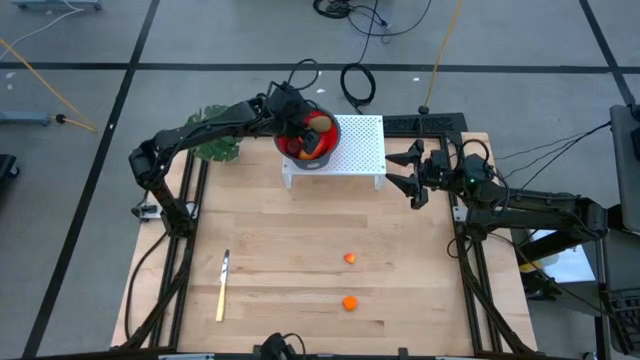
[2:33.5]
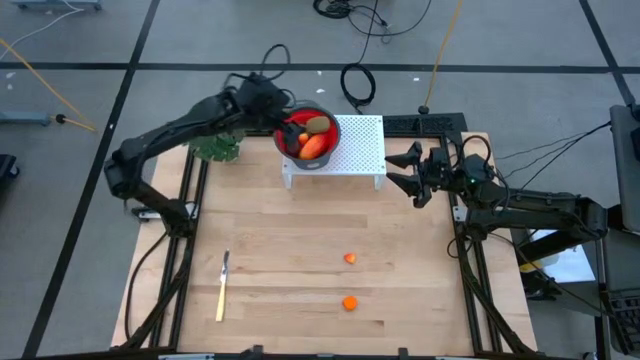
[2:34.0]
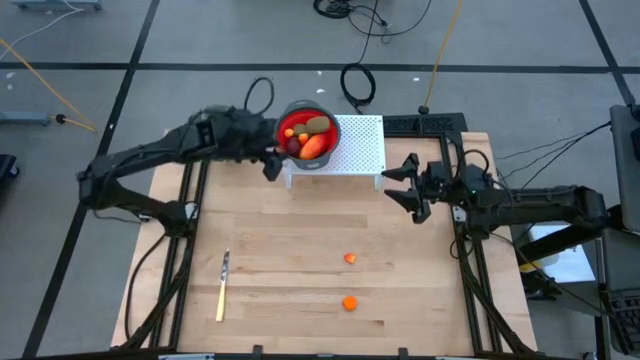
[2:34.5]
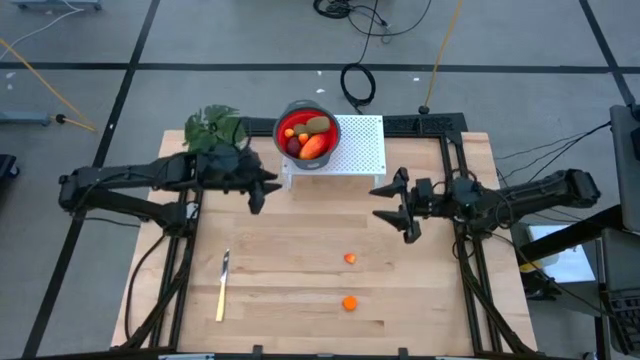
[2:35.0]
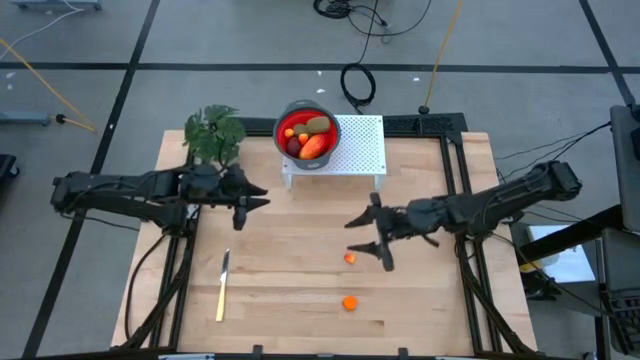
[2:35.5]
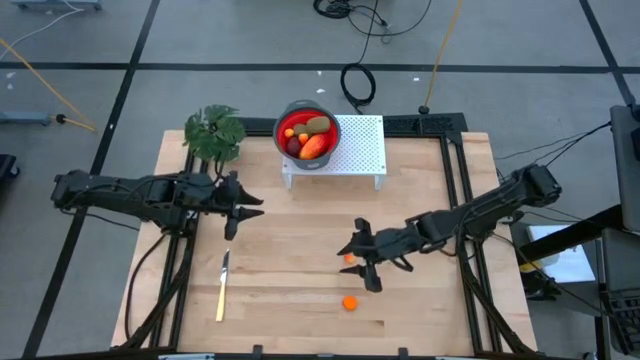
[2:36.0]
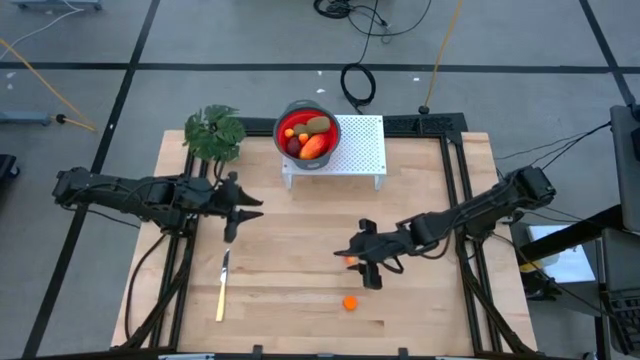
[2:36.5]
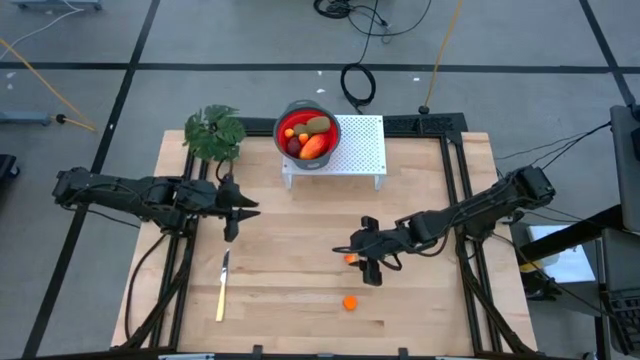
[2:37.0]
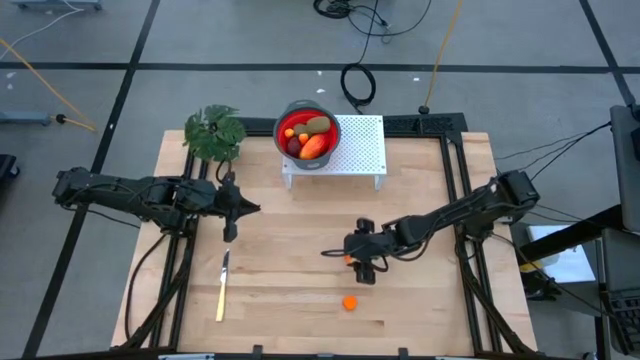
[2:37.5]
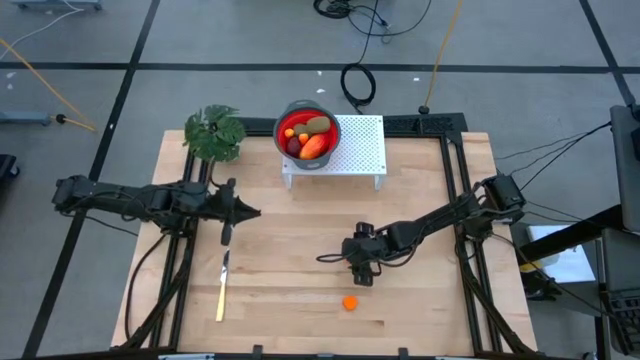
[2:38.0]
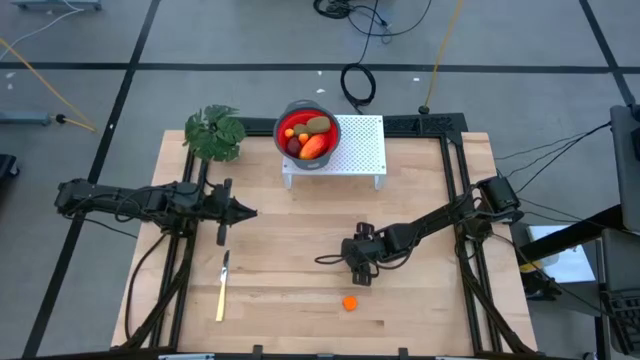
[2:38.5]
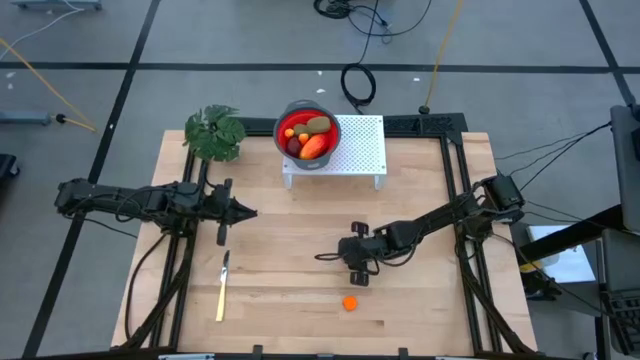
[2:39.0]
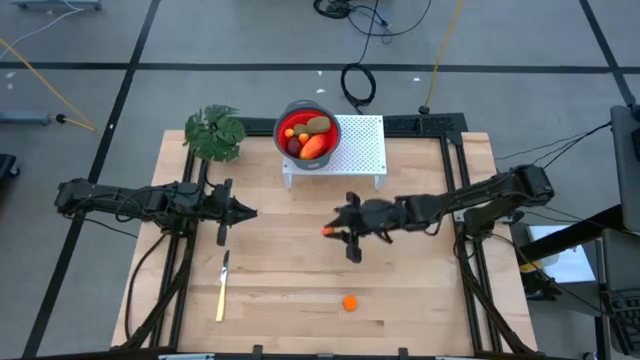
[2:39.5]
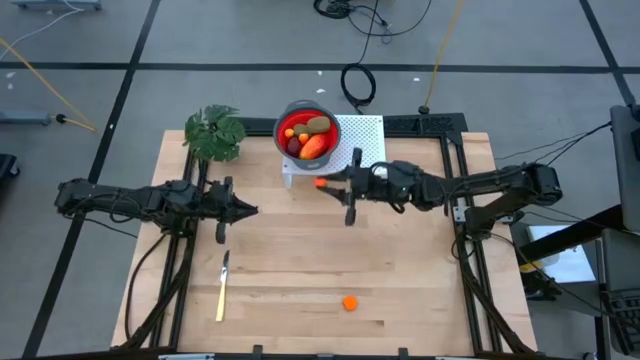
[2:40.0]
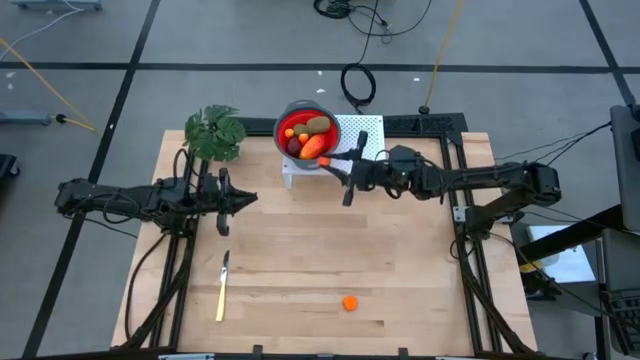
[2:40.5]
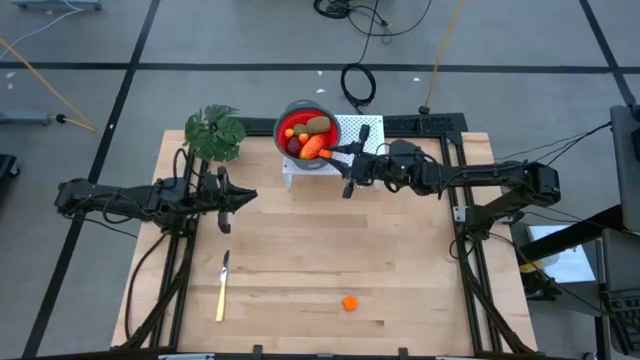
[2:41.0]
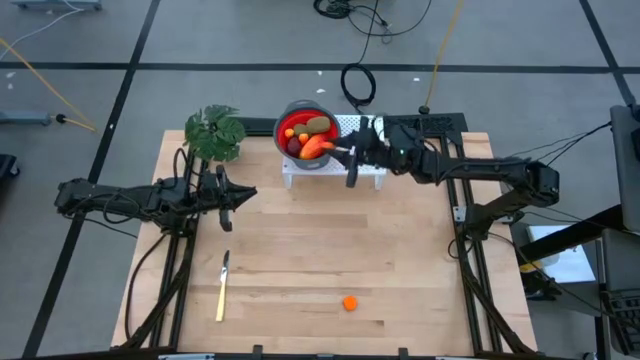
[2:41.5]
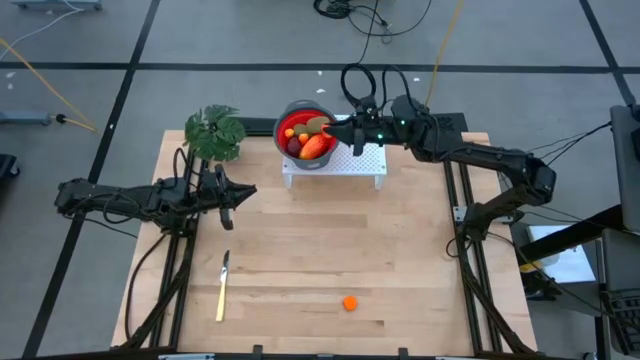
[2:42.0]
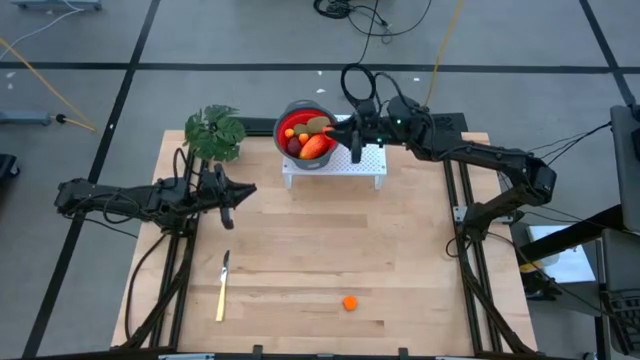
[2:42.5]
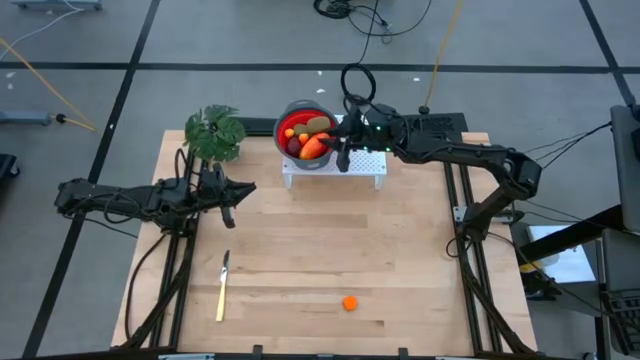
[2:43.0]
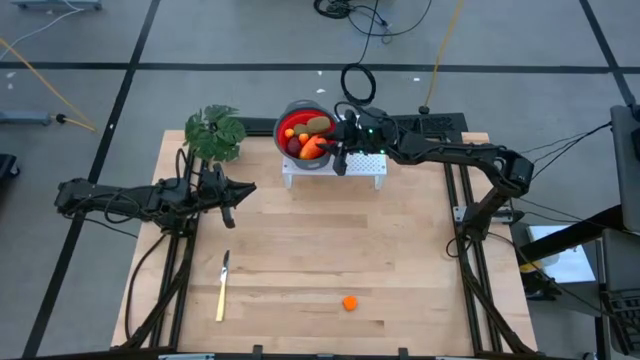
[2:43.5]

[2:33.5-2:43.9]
Task: Pick & Place Fruit
Put the pear into the red strainer bowl on the shelf

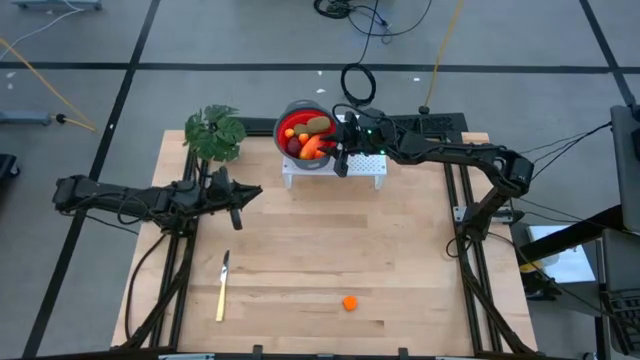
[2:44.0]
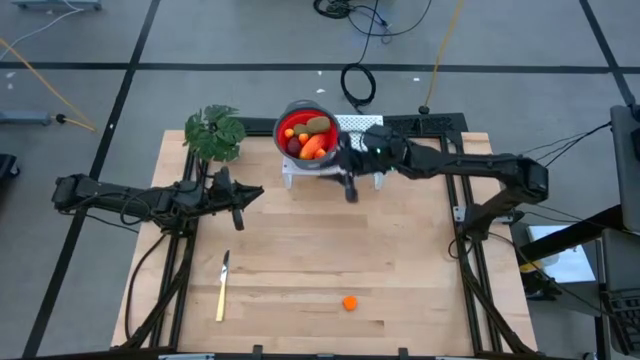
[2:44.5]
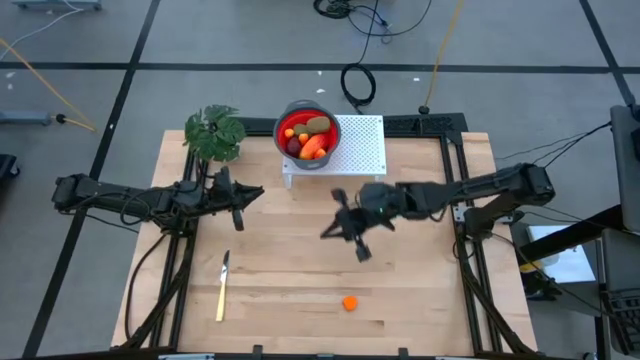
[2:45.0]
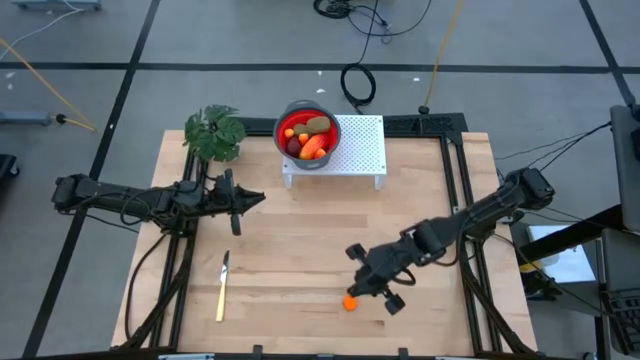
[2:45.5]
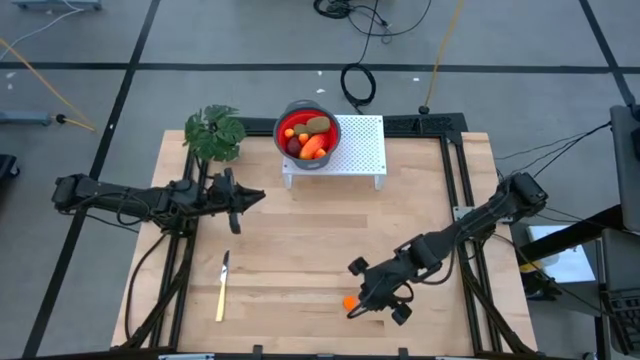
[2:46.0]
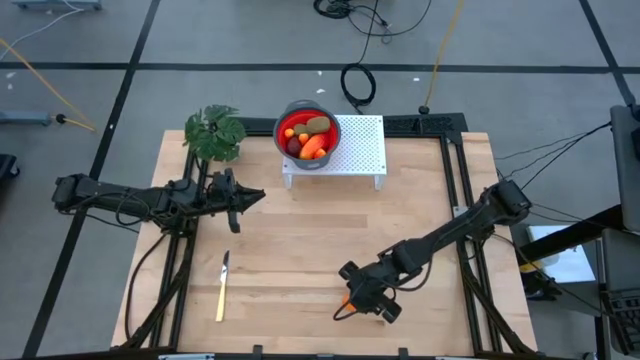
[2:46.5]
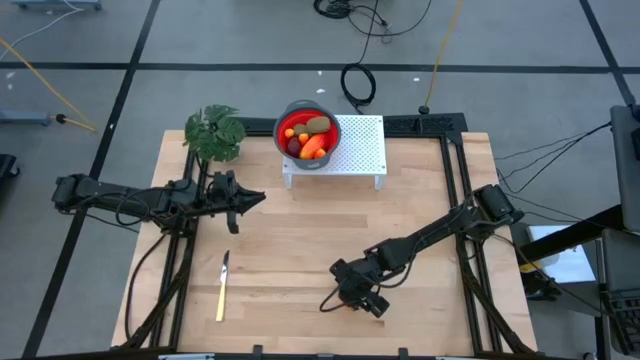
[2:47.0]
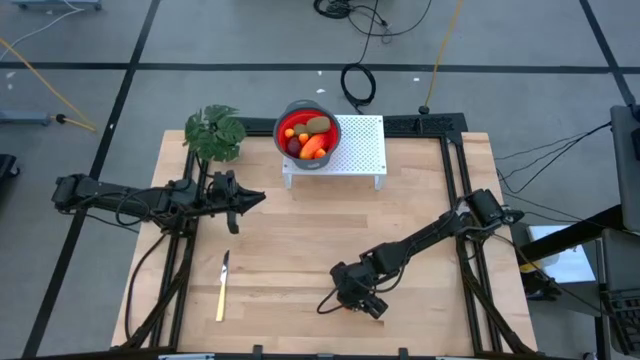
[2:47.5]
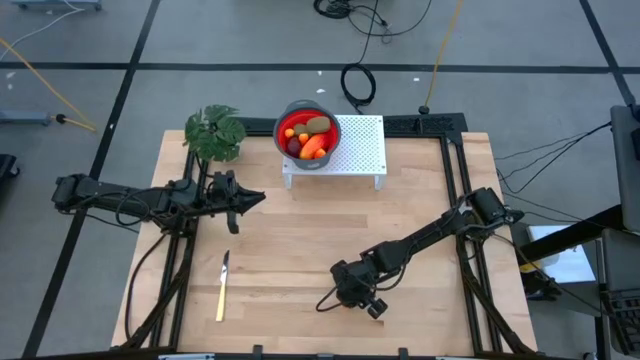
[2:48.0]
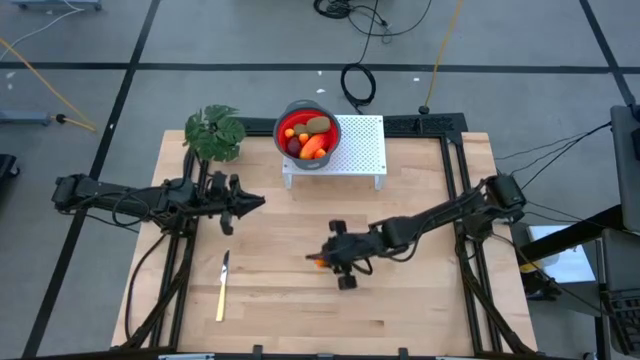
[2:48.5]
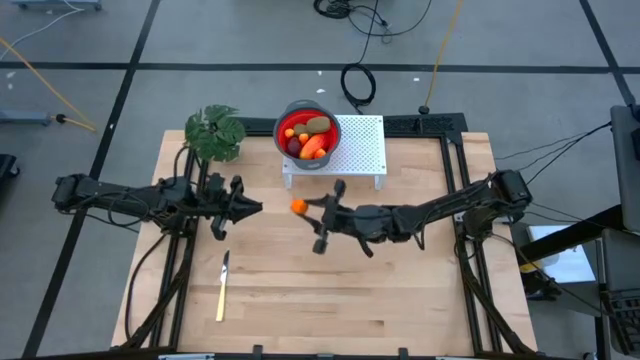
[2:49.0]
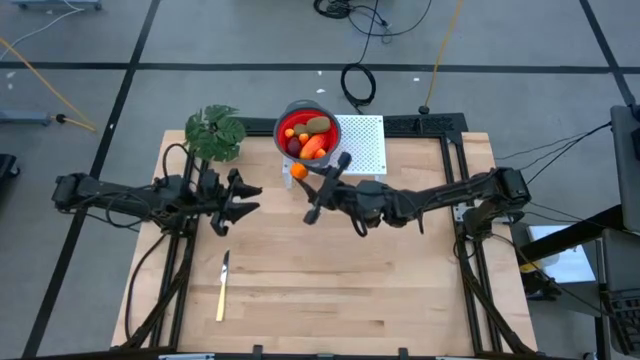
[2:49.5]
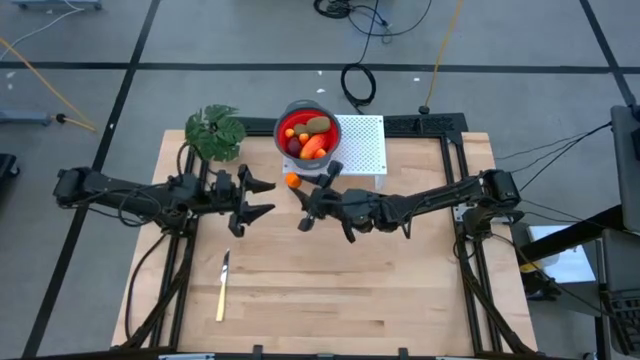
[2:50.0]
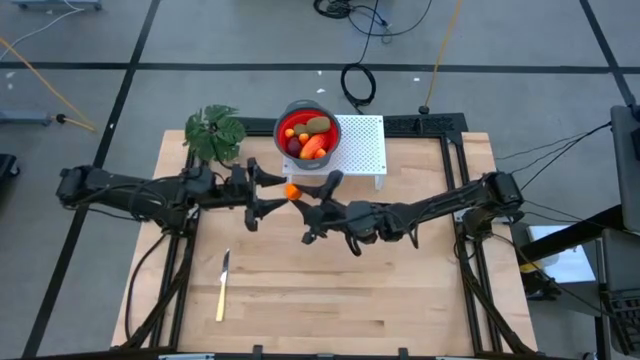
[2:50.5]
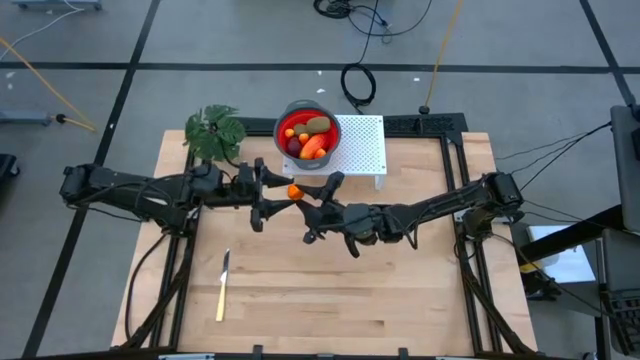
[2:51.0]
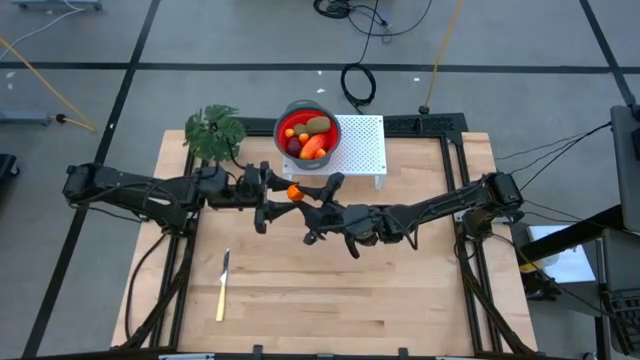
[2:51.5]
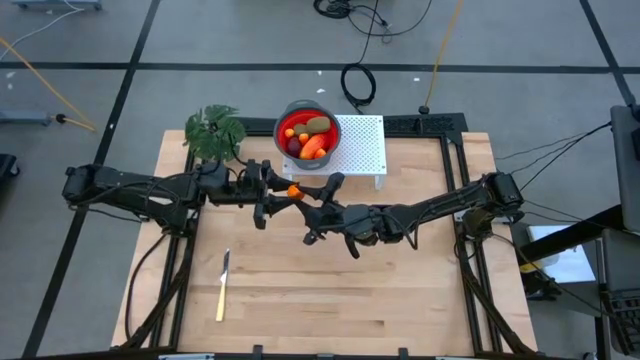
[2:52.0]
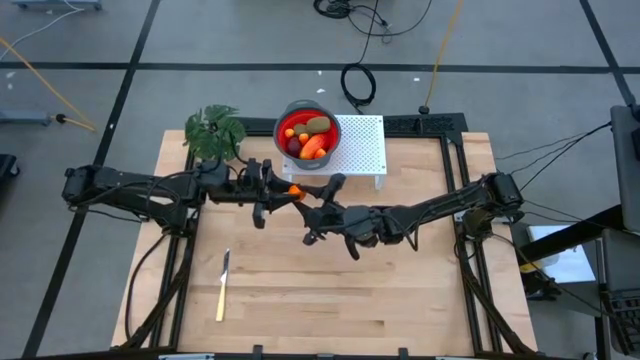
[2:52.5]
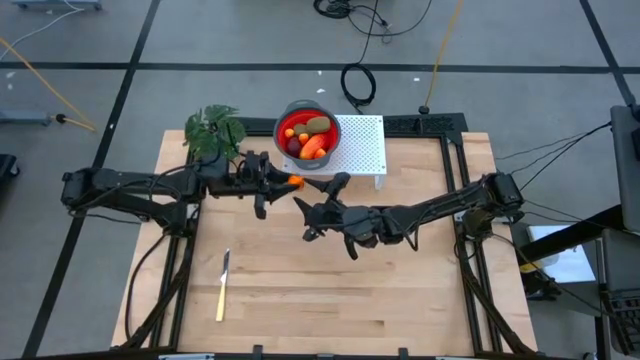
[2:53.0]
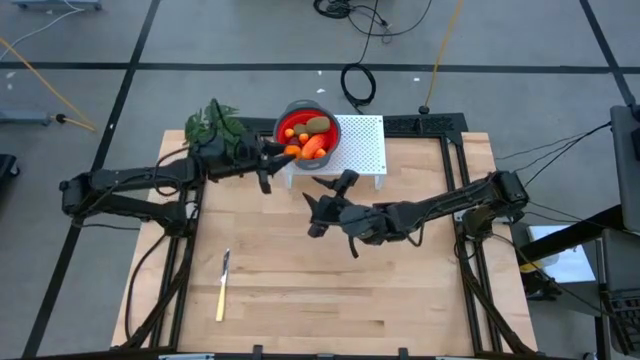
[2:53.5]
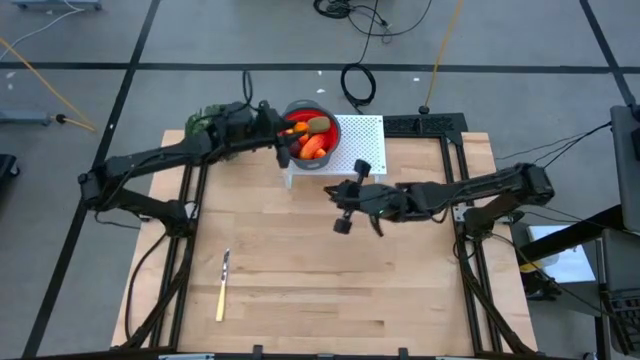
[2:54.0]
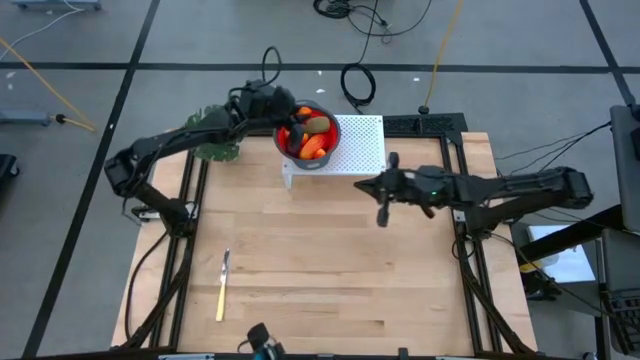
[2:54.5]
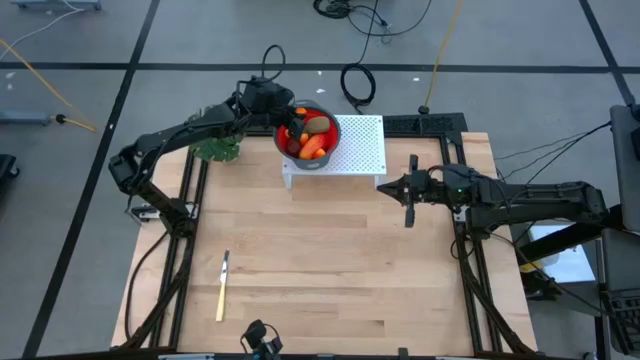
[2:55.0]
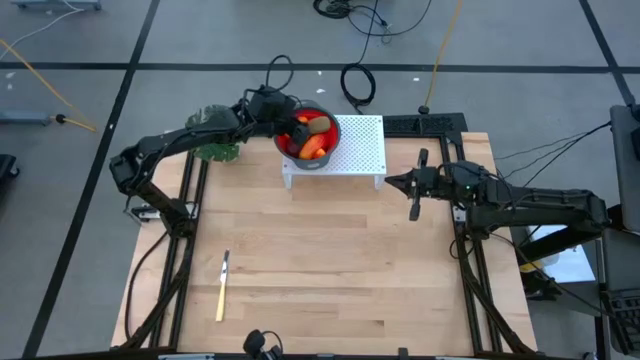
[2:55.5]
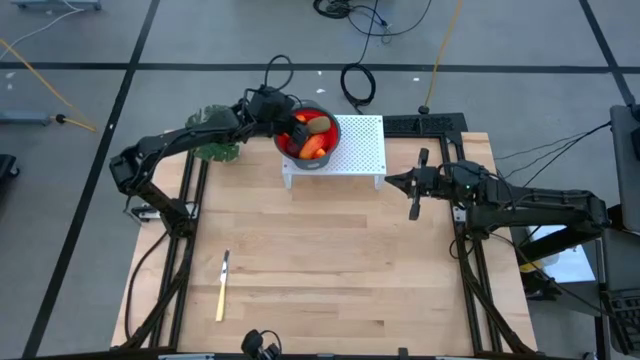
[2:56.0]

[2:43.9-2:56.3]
Put the orange into the red strainer bowl on the shelf
